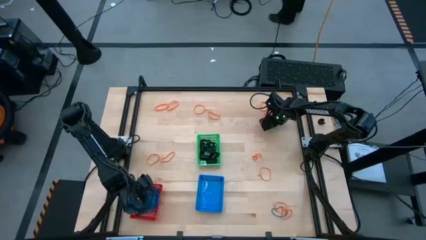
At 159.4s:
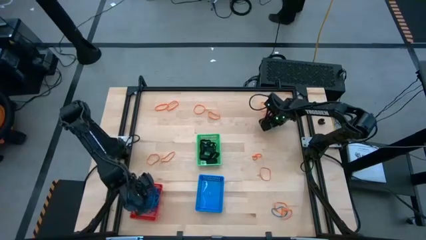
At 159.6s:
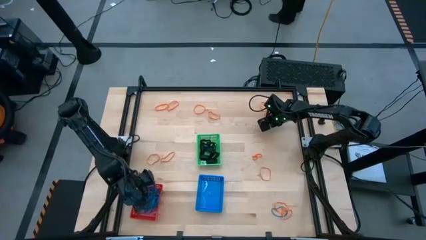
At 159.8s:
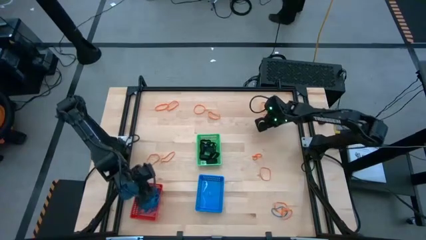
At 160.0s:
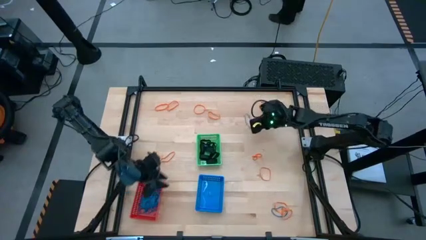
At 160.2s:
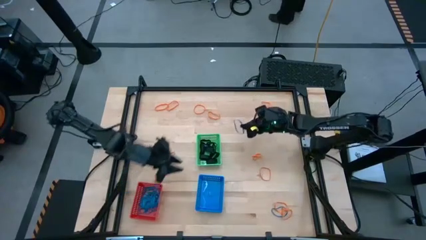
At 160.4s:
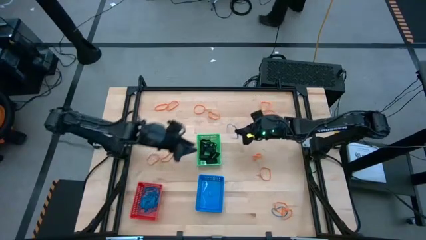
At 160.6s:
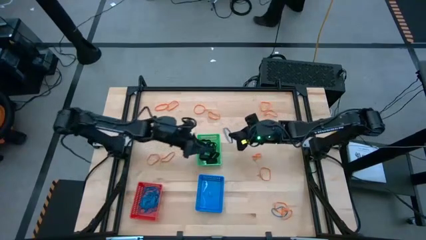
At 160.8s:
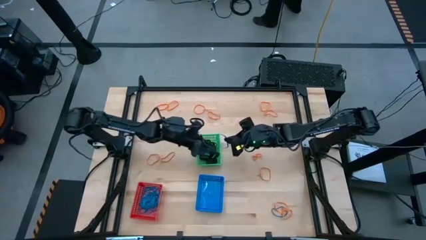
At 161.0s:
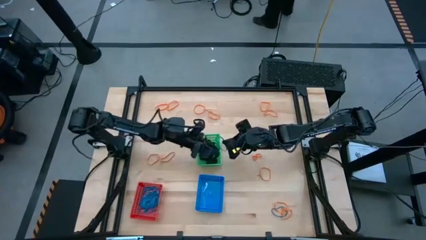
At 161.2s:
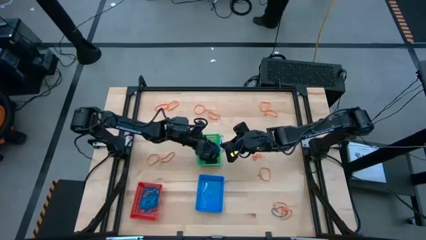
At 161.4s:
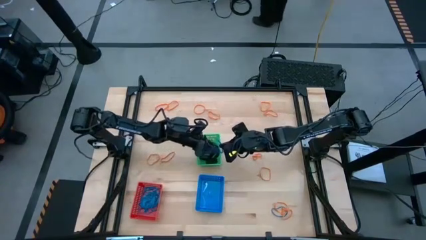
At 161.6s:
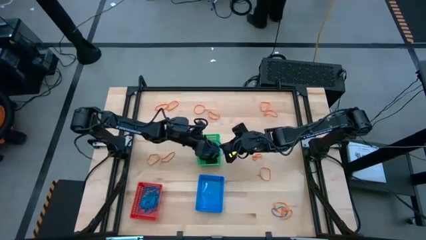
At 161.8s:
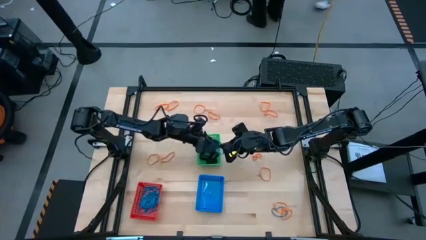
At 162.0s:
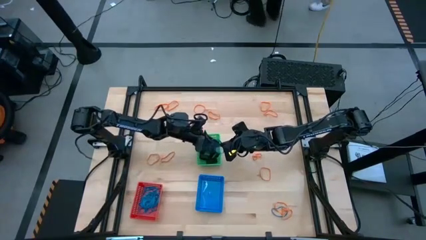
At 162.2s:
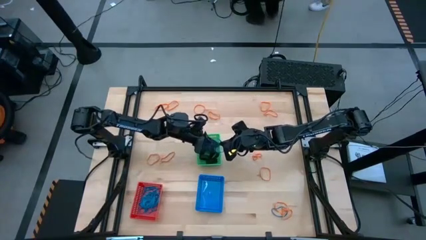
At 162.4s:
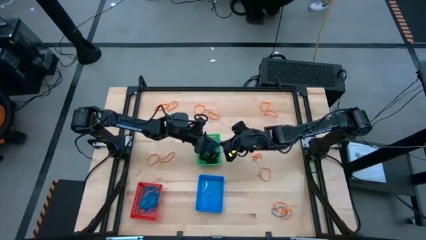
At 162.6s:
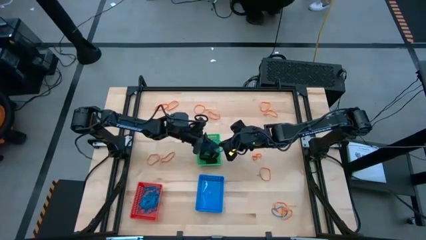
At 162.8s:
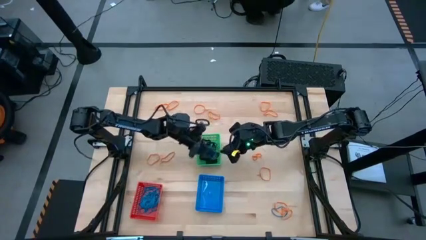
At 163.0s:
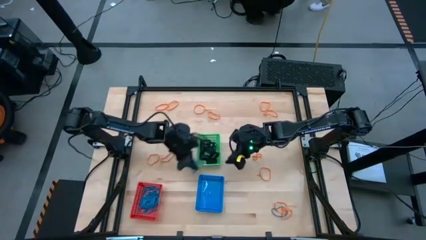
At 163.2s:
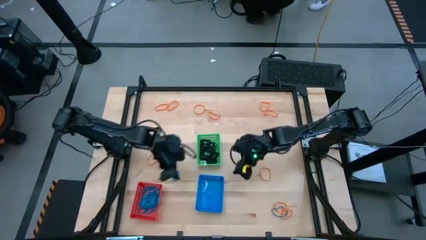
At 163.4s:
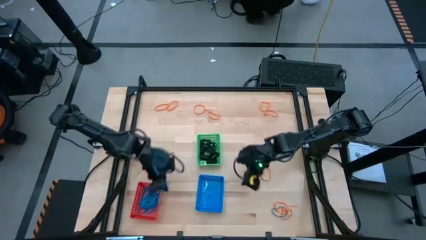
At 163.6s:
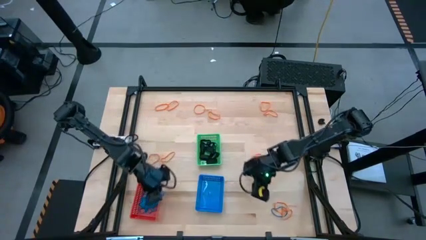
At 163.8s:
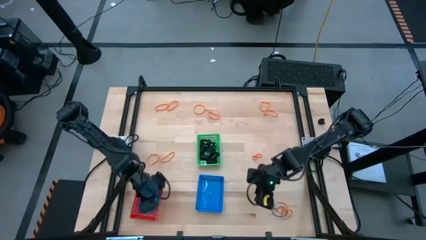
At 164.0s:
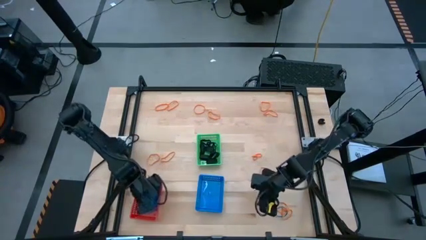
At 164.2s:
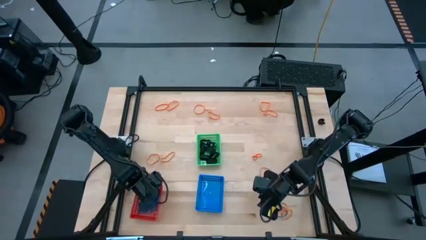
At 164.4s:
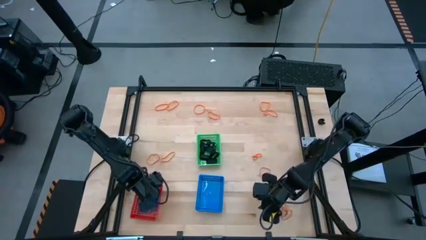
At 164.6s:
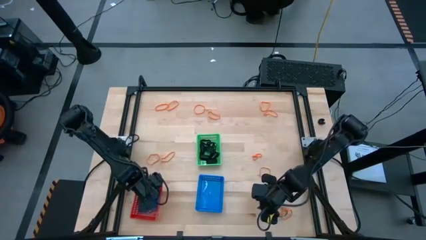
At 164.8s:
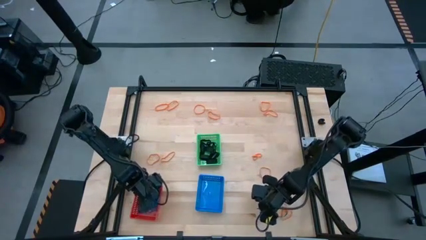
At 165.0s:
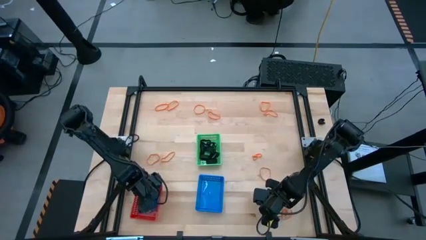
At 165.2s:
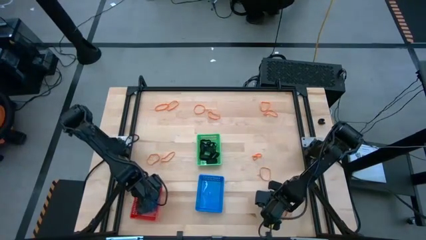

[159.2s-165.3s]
Task: Sort rubber bands into baskets
Put the blue rubberband into the red bin

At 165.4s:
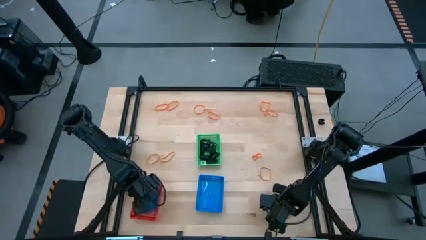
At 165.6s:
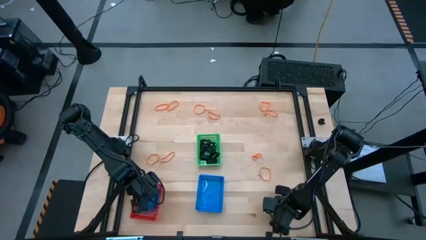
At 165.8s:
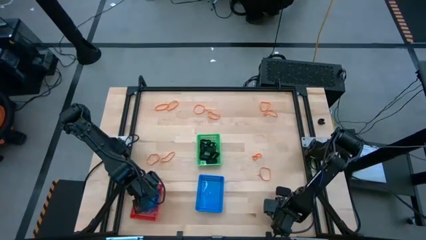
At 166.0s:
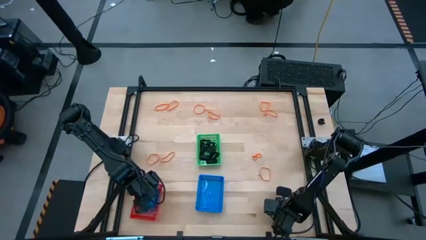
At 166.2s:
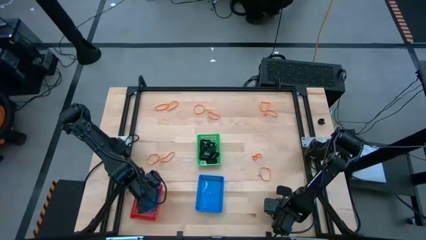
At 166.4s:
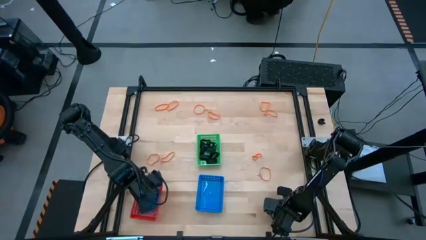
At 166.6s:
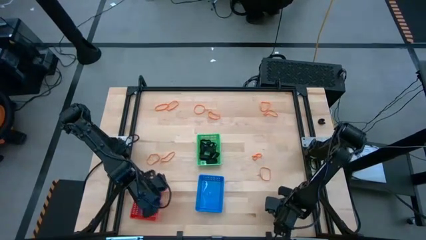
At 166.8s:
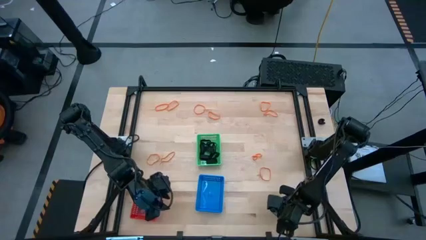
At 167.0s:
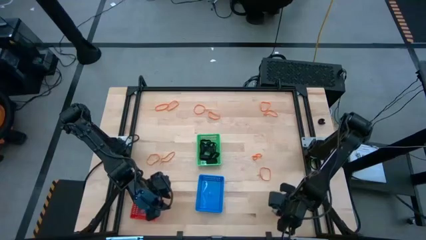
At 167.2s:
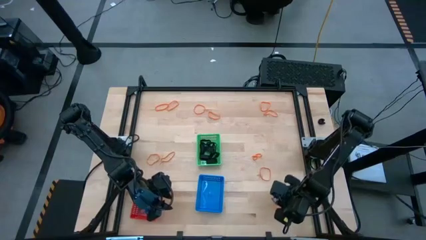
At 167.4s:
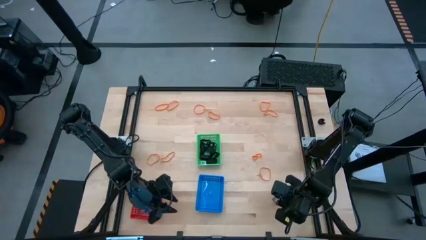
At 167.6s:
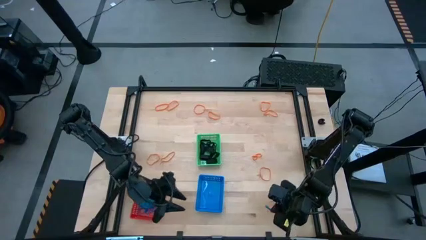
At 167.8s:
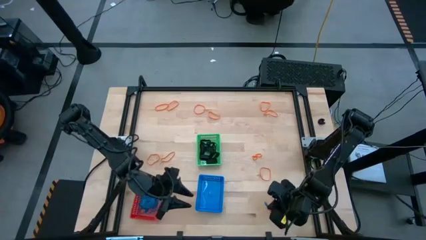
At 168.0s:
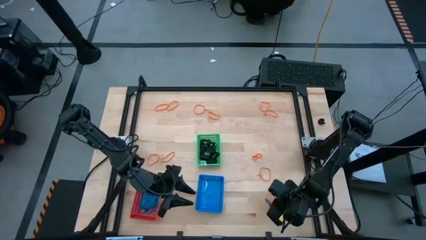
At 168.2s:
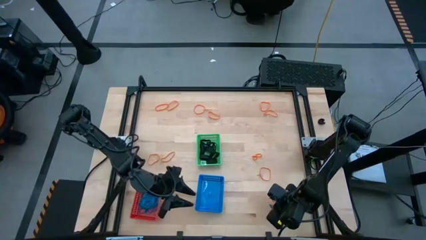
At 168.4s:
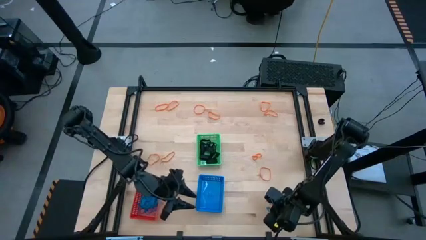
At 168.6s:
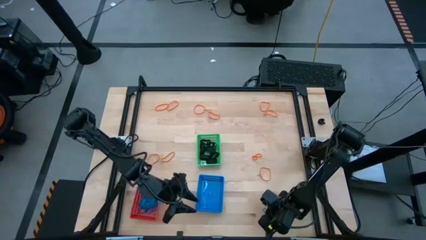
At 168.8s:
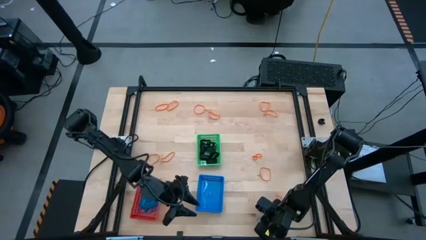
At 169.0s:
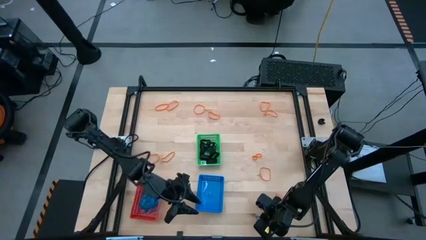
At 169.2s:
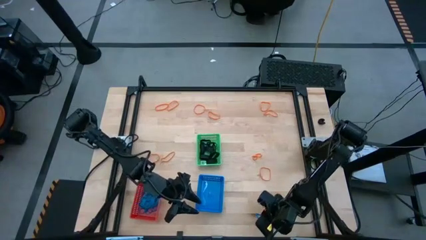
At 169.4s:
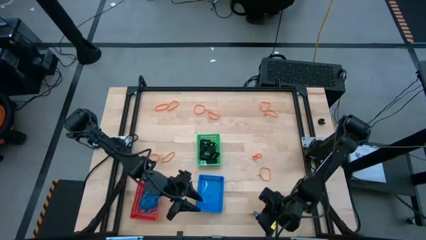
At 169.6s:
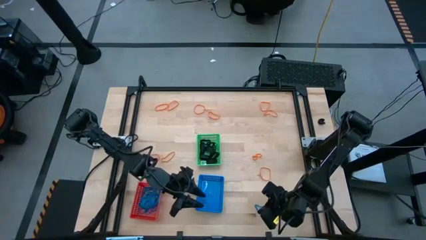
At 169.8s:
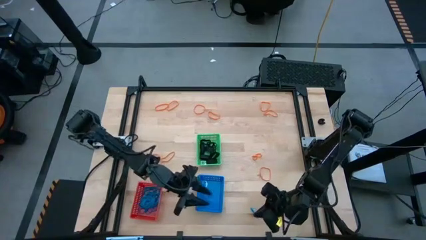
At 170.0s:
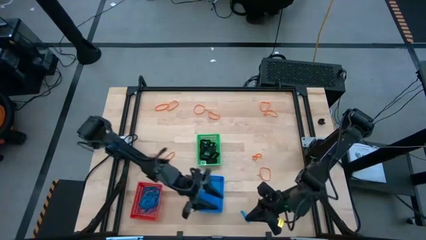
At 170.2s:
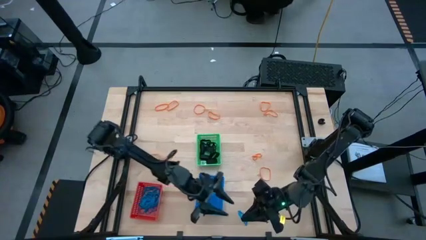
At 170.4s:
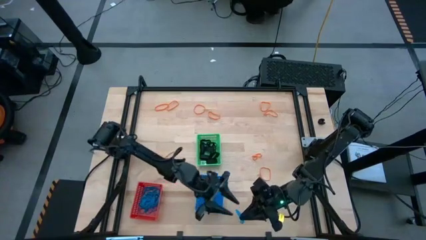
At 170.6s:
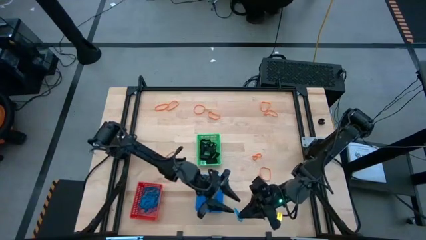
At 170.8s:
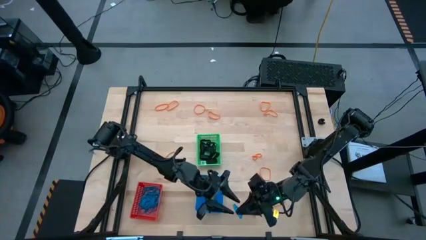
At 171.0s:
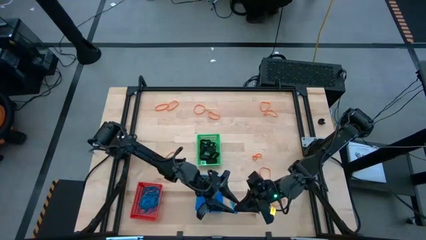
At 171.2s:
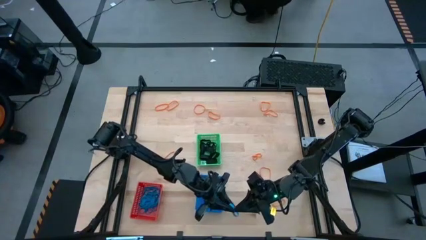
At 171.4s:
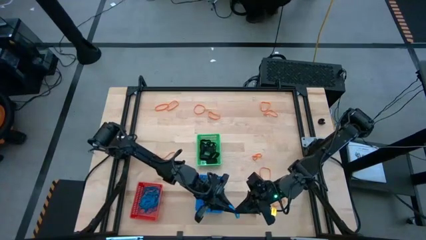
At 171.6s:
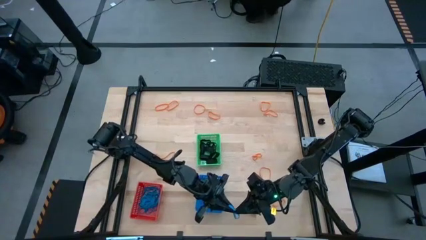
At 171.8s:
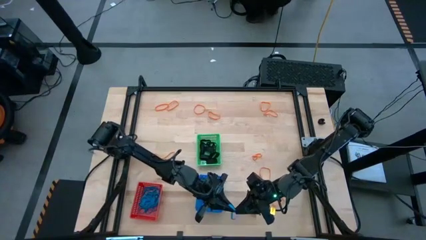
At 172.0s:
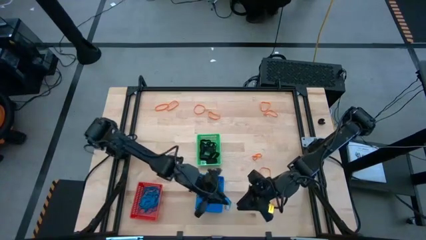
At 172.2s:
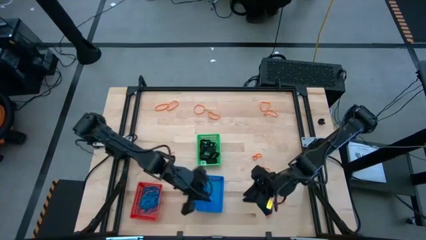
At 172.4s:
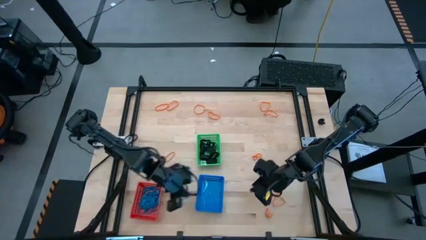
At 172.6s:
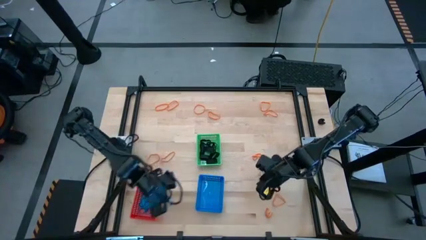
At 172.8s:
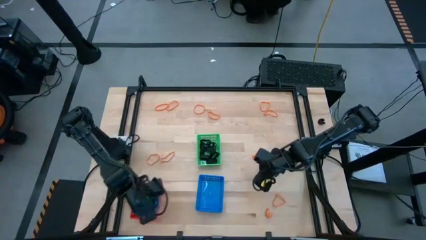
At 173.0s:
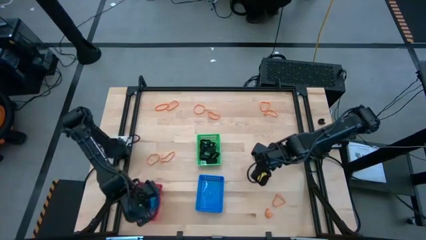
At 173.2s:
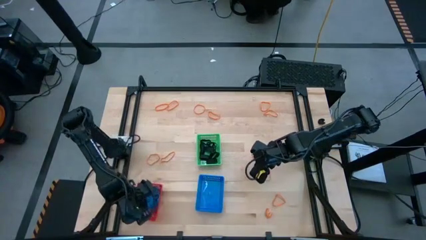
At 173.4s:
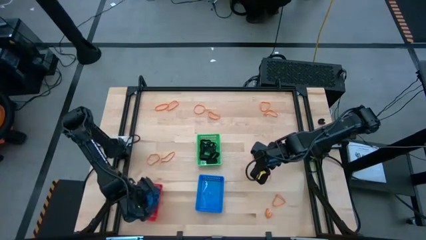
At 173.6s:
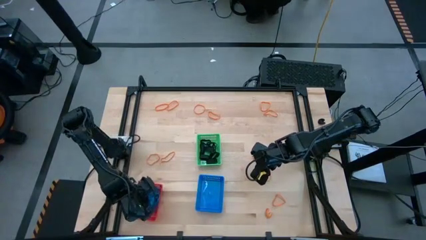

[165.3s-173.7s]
Put the blue rubberband into the red bin

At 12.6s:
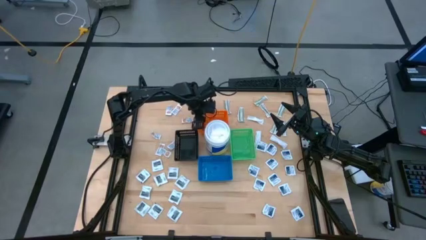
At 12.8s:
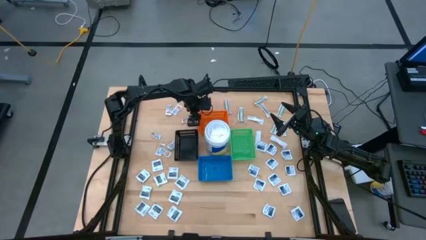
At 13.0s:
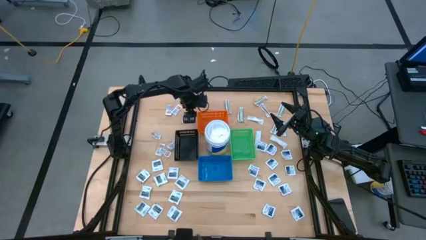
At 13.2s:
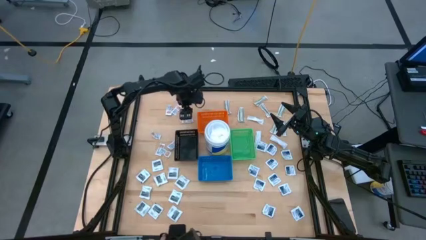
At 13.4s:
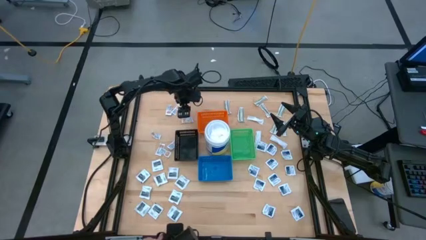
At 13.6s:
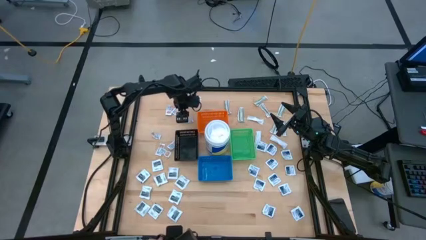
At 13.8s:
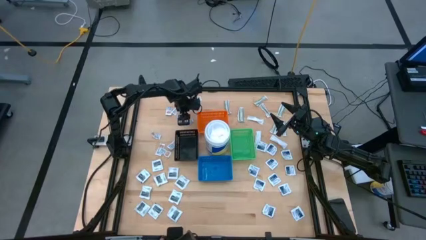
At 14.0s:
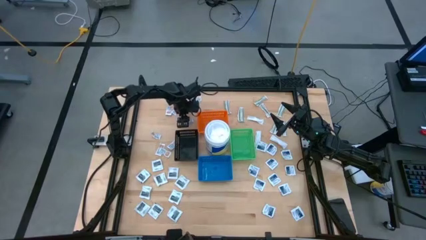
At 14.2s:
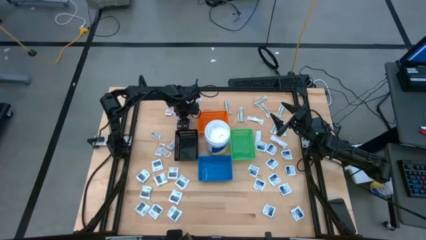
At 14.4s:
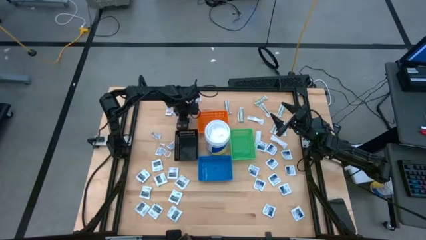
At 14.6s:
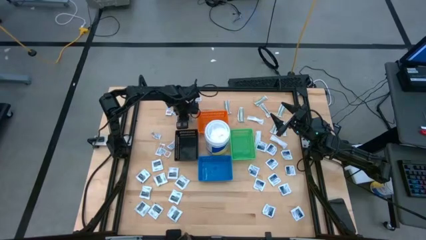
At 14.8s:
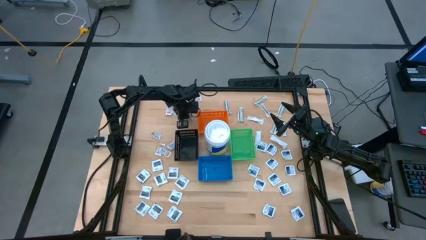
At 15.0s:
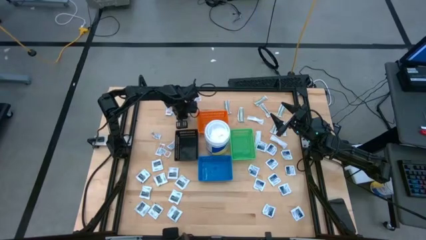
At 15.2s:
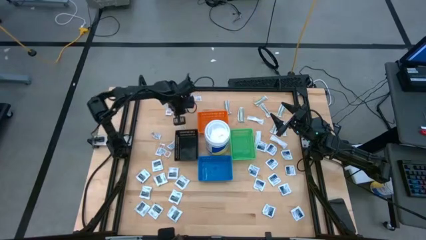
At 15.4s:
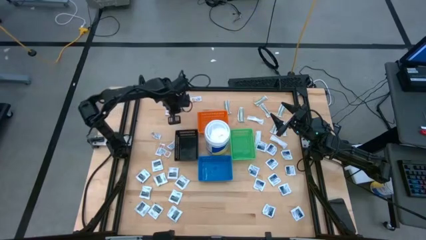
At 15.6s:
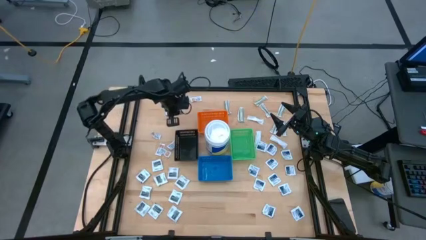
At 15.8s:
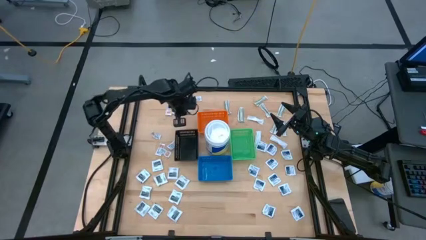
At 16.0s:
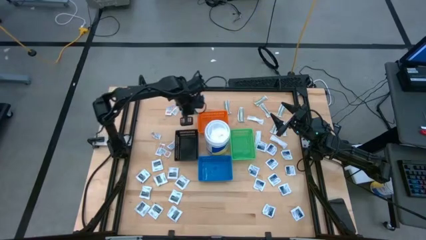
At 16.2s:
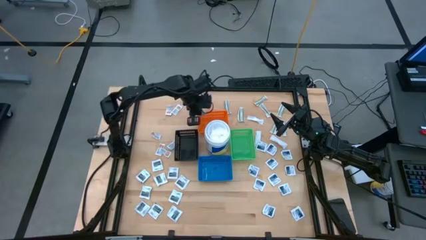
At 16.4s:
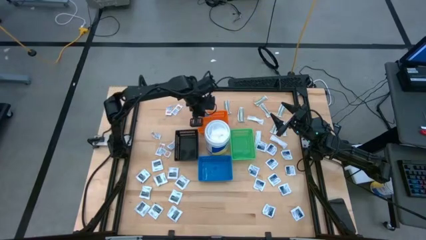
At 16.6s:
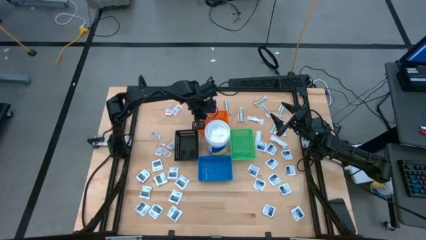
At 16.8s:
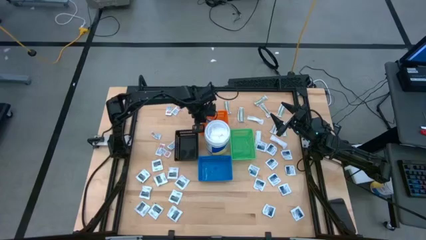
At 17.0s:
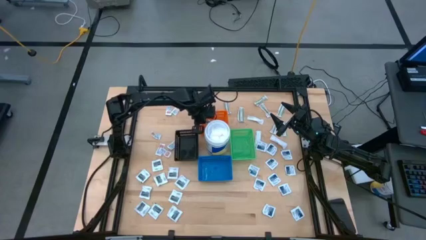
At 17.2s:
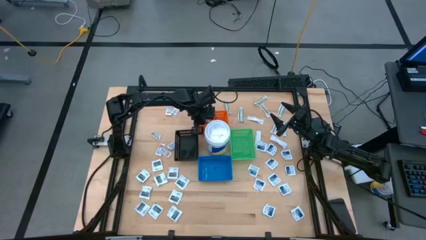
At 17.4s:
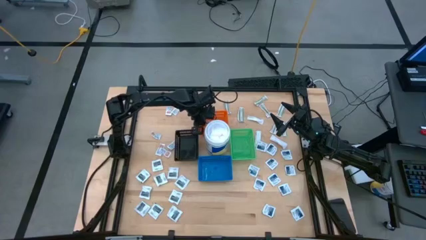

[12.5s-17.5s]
Task: Pick & Place First Aid Supplies
Put the orange ointment pack into the orange bin
